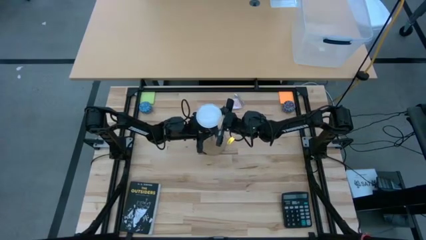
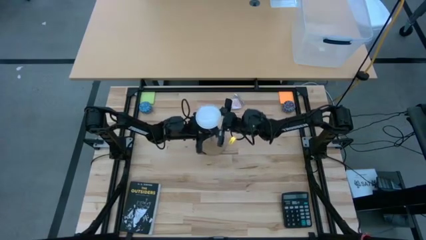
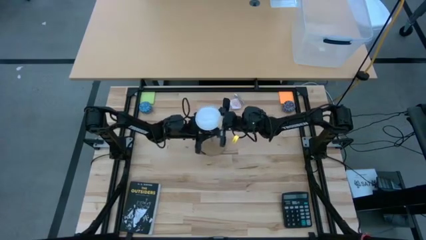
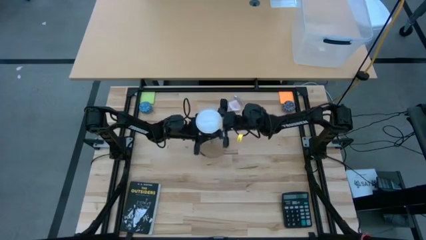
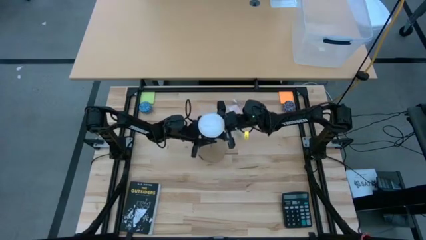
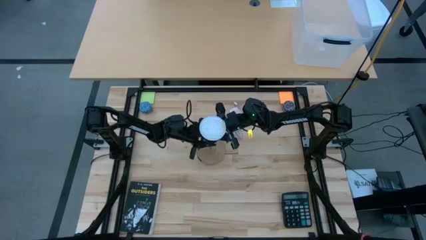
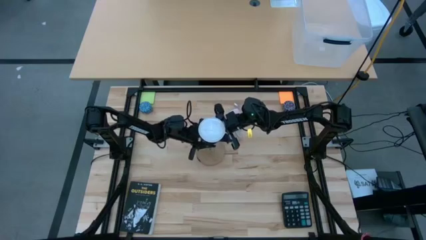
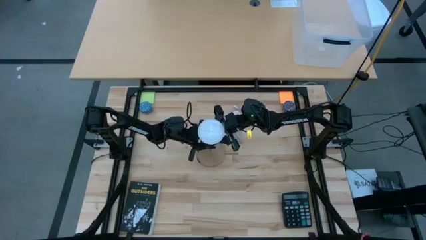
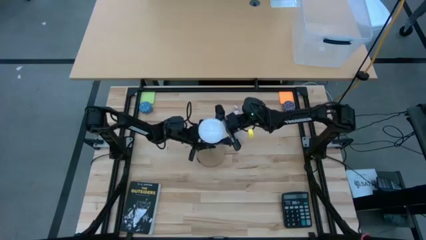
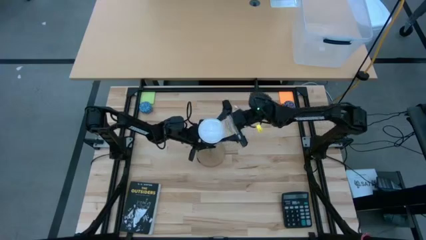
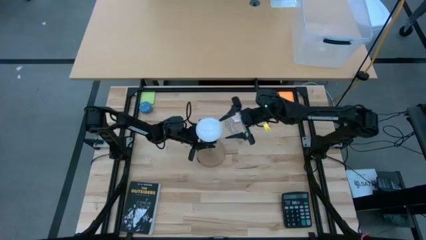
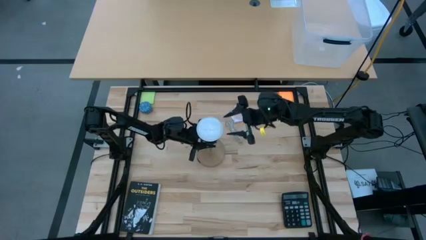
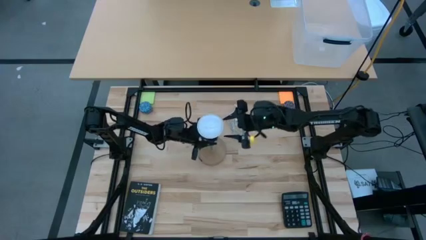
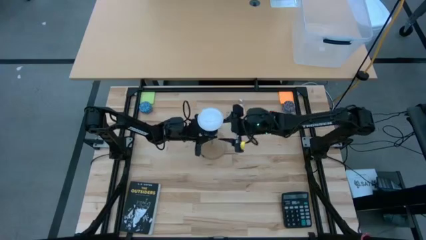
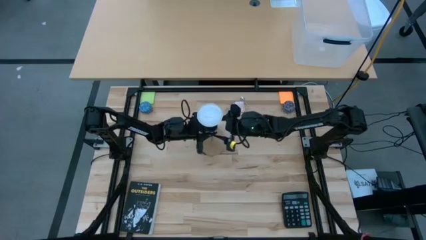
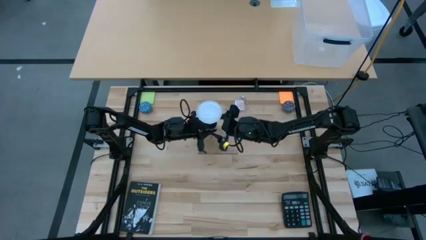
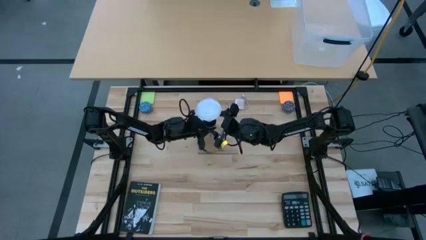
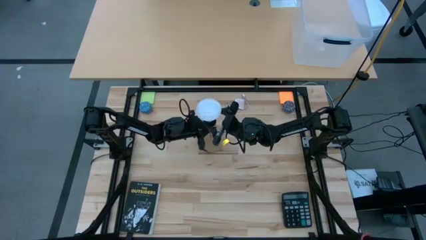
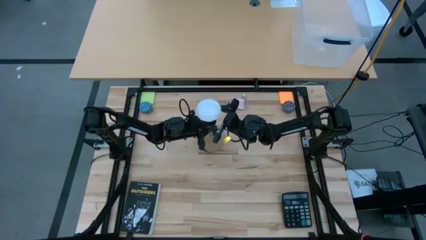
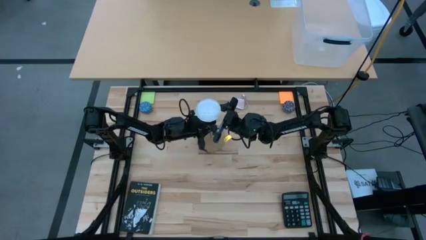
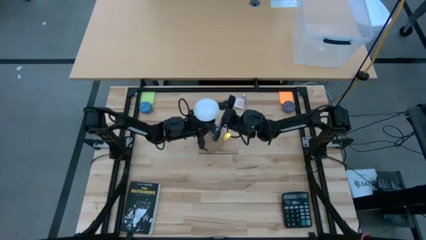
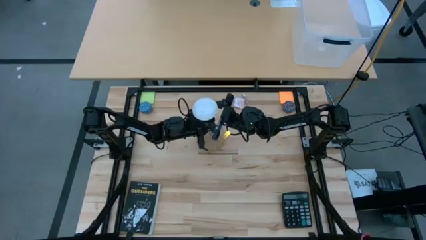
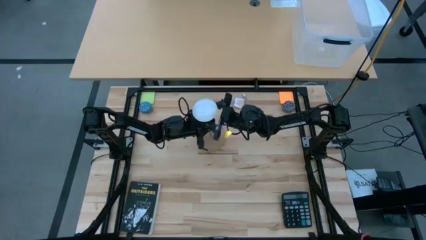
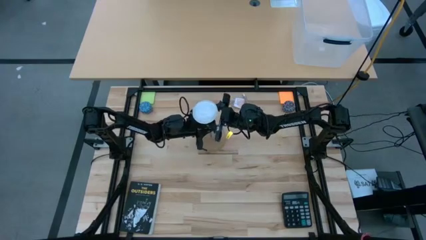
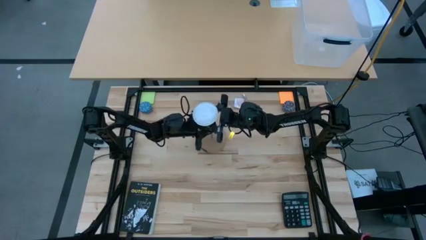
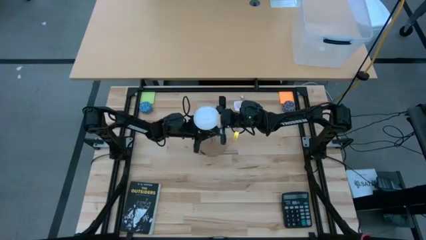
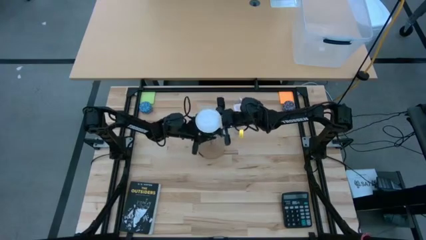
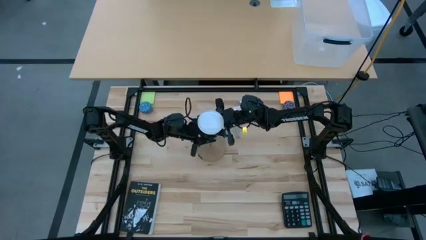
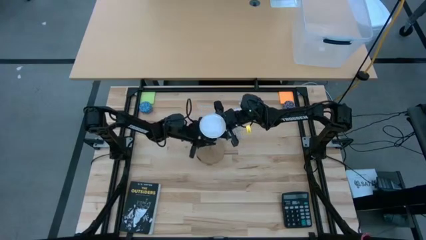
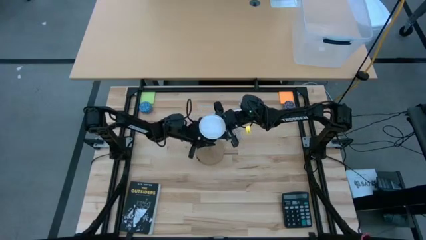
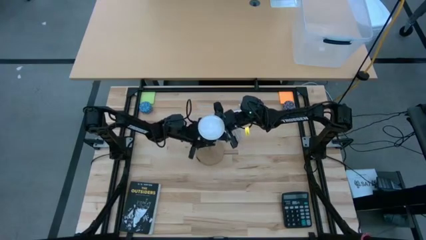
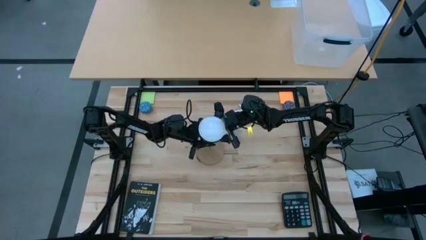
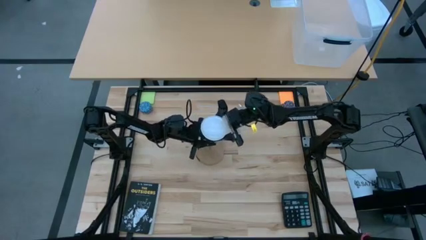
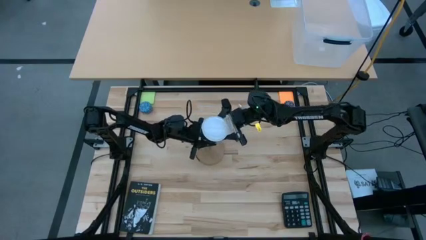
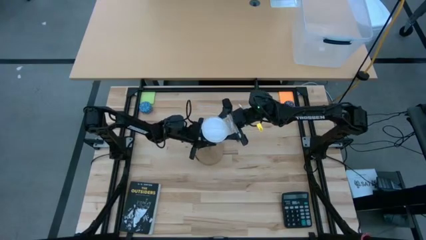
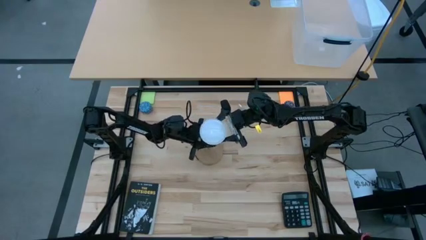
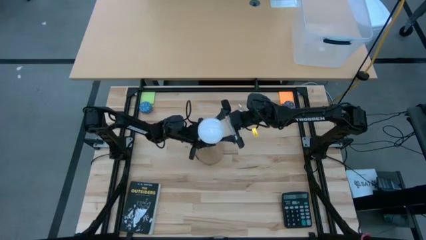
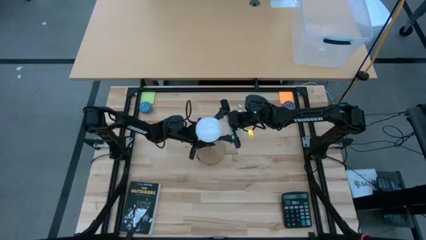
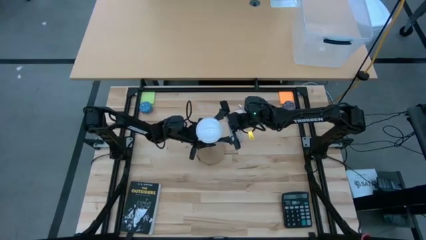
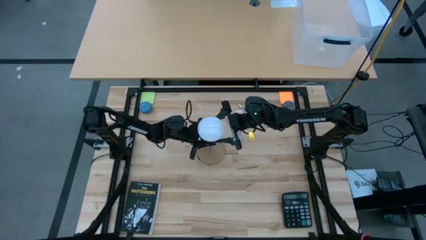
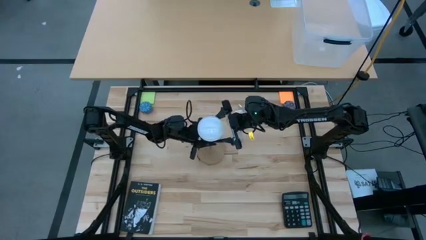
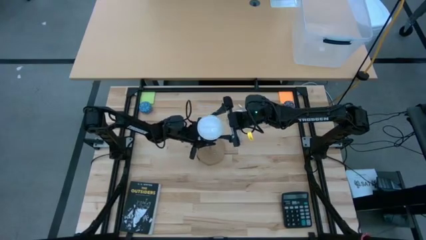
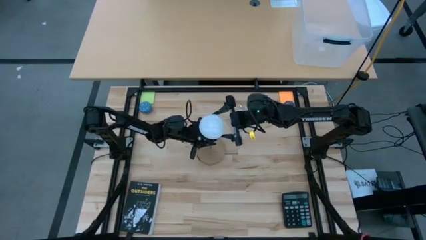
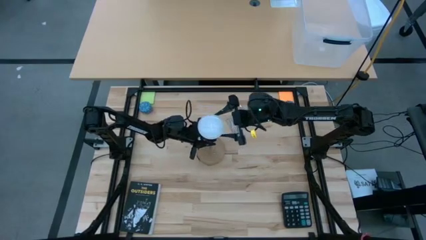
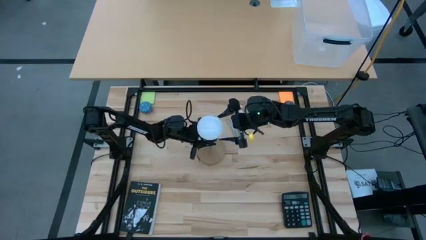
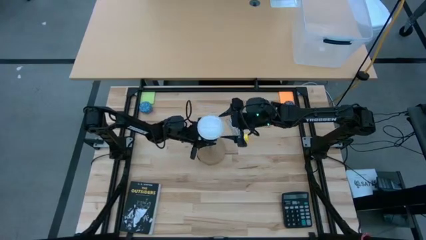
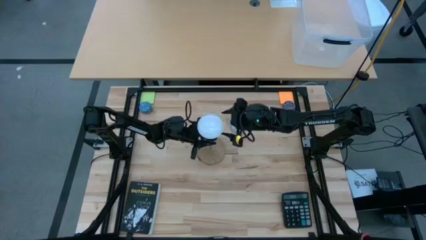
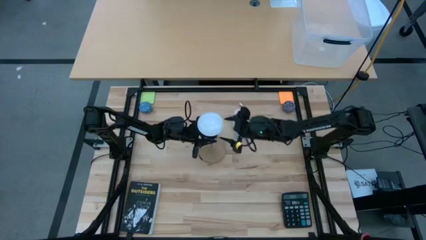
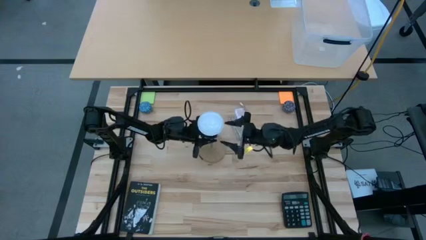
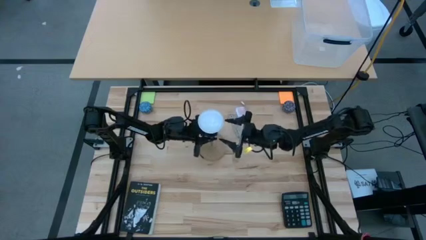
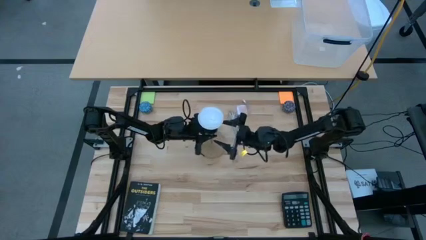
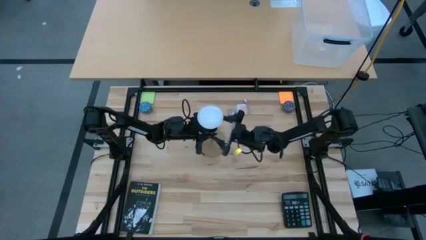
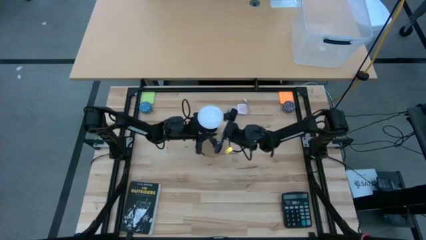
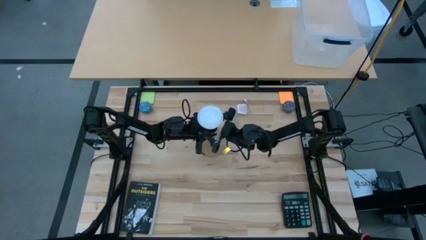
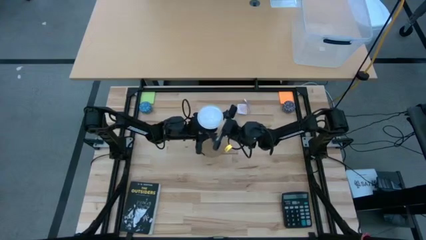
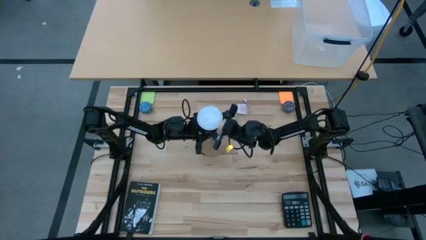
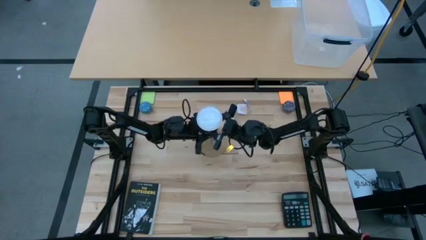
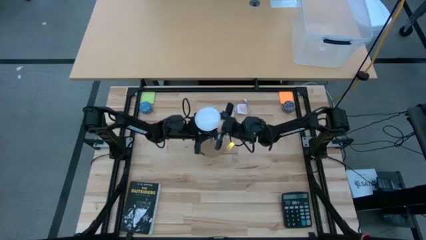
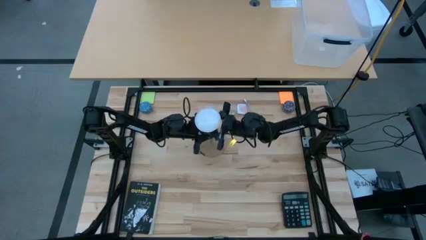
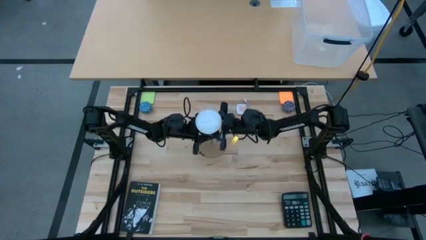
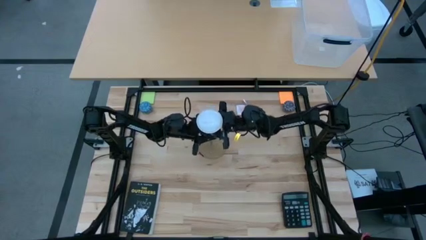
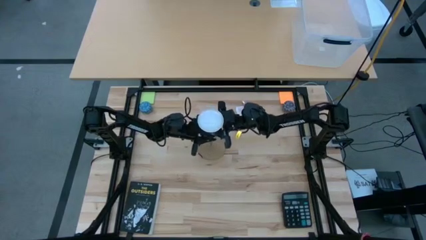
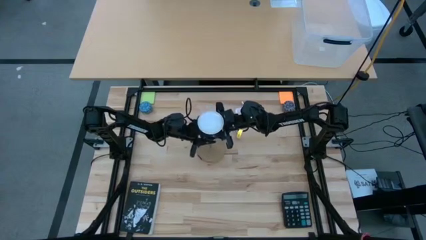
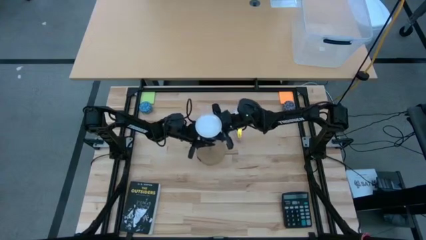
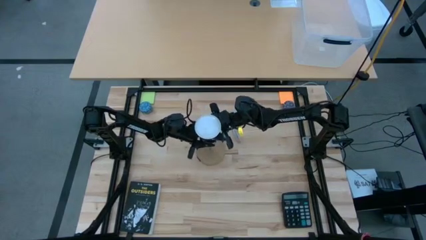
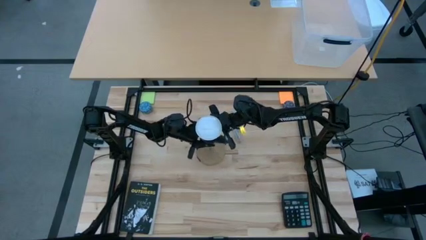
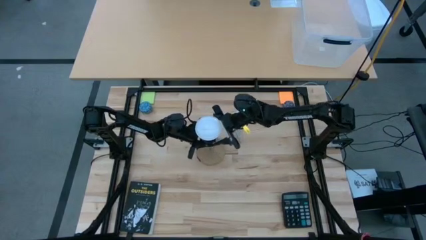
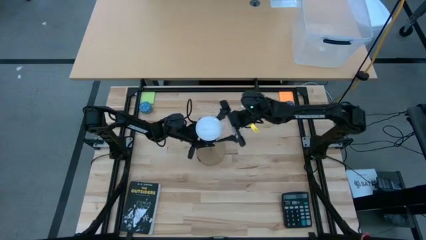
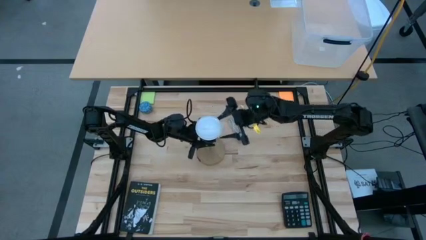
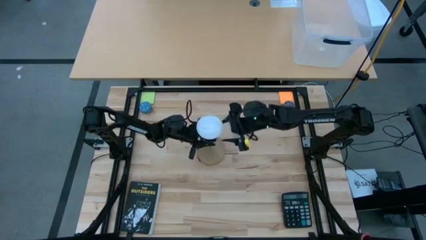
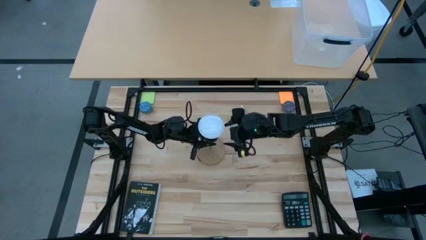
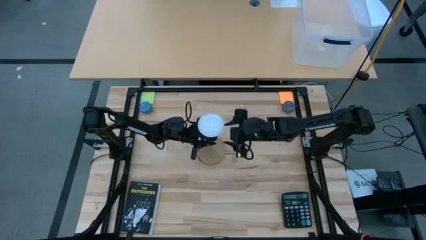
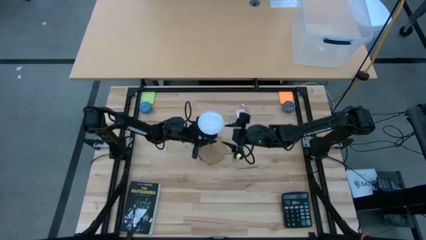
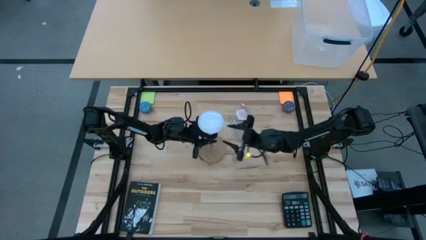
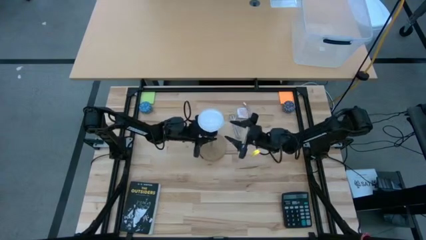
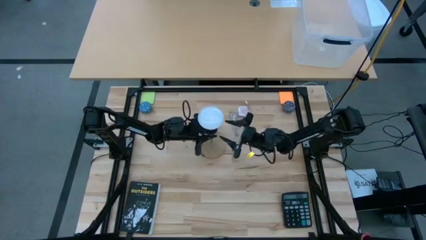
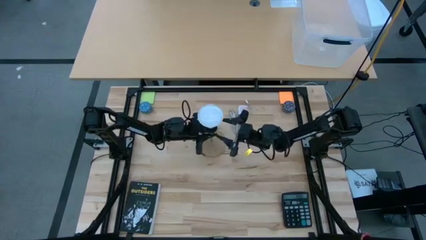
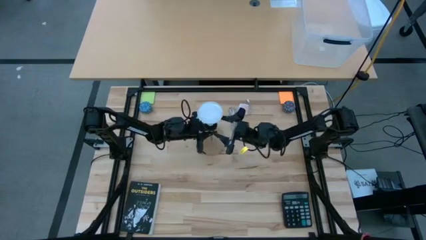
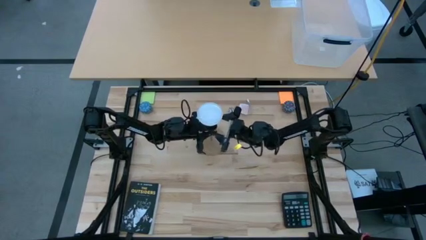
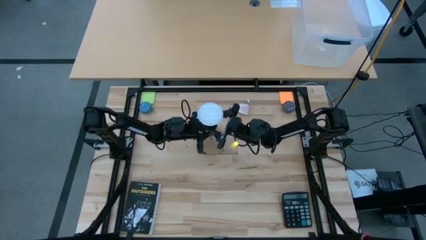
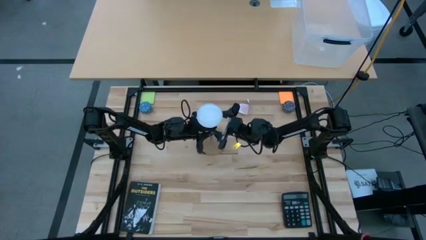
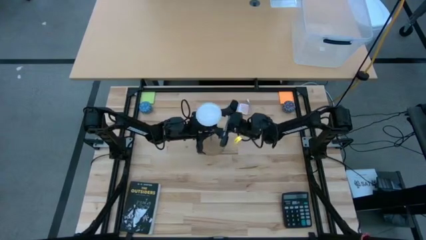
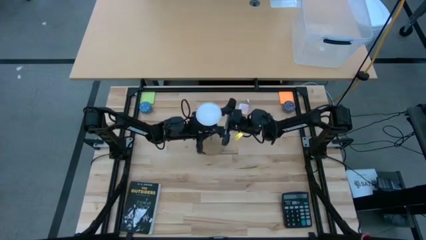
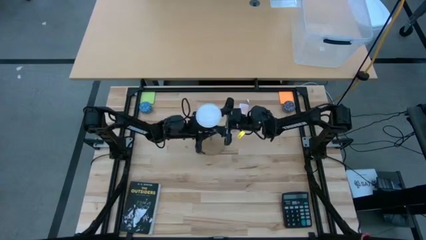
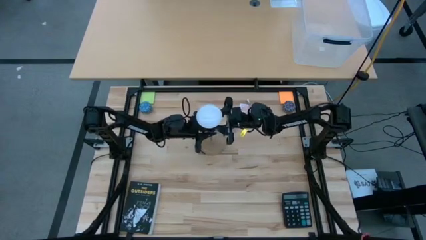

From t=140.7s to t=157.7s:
Task: Screw lightbulb
Remove the lightbulb from the lamp
